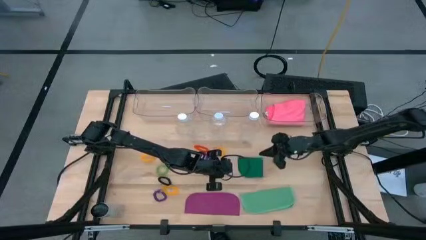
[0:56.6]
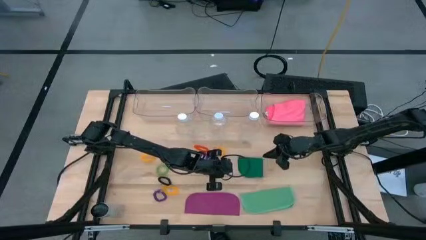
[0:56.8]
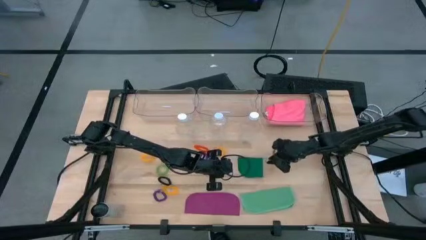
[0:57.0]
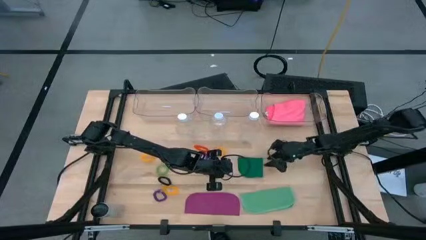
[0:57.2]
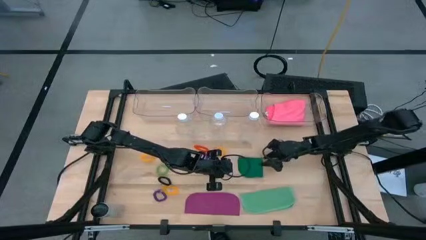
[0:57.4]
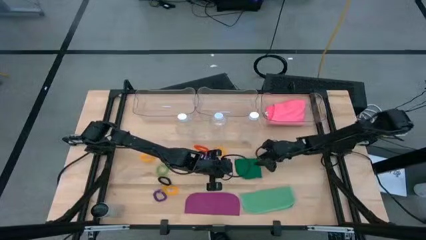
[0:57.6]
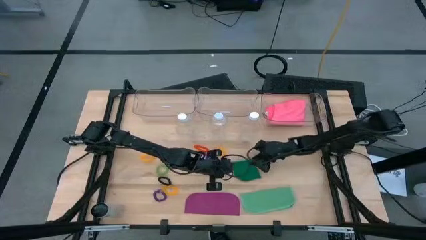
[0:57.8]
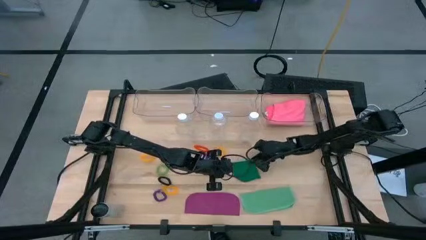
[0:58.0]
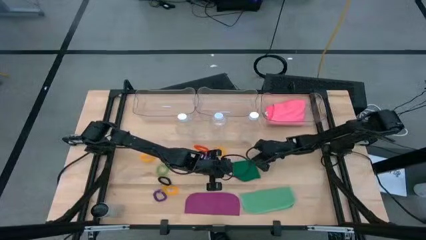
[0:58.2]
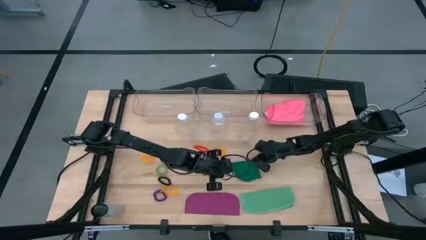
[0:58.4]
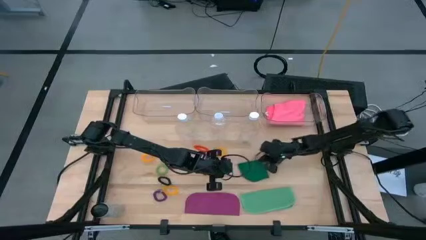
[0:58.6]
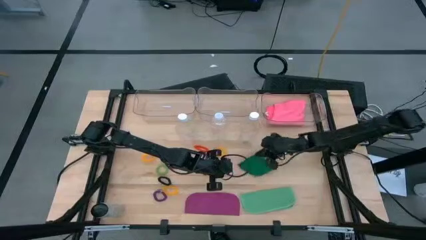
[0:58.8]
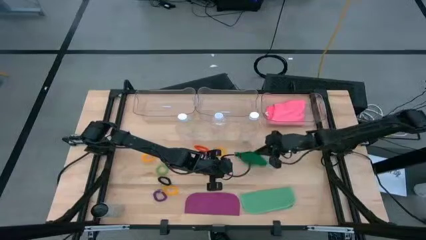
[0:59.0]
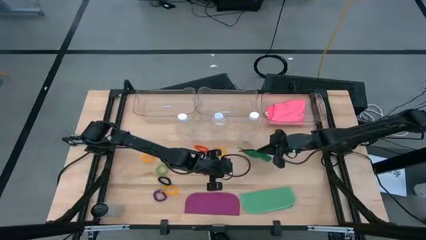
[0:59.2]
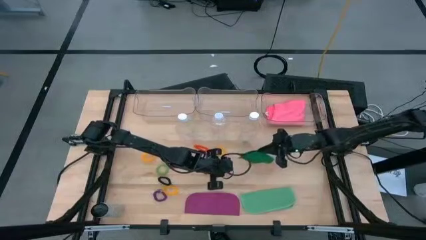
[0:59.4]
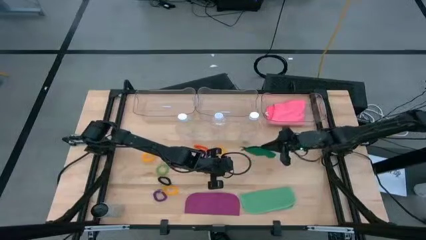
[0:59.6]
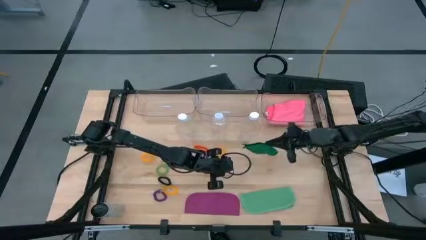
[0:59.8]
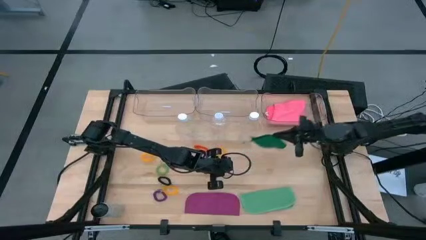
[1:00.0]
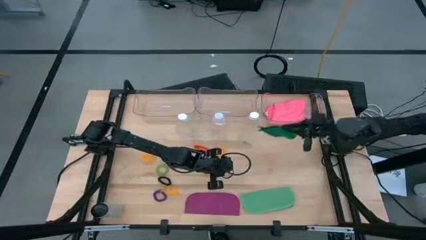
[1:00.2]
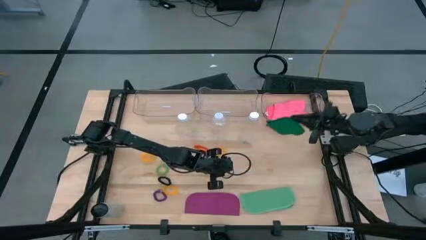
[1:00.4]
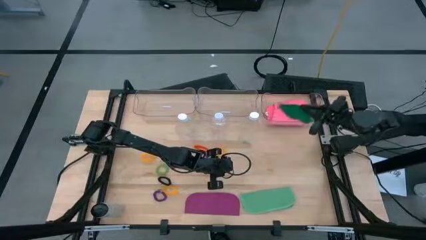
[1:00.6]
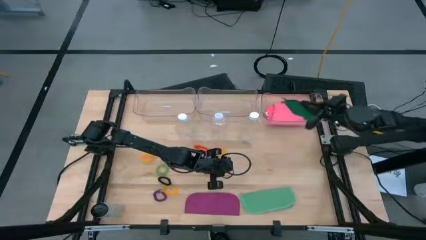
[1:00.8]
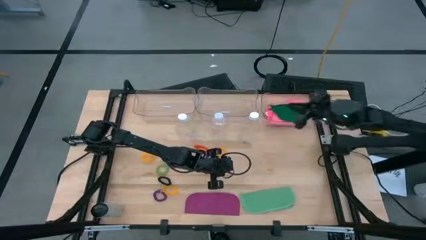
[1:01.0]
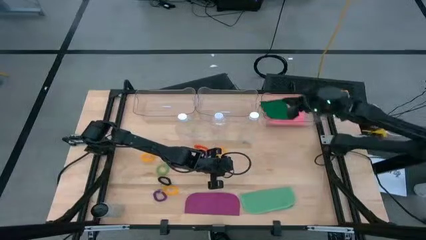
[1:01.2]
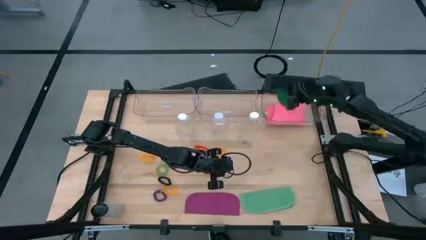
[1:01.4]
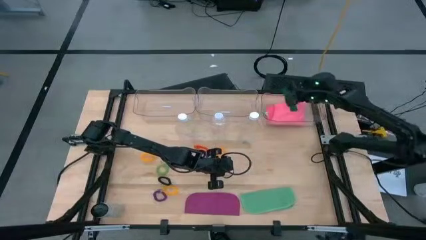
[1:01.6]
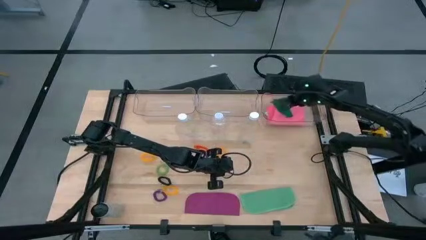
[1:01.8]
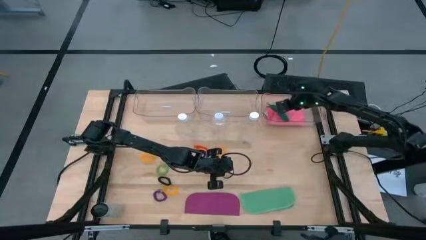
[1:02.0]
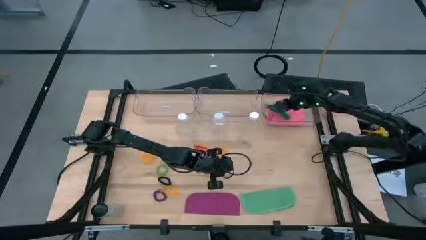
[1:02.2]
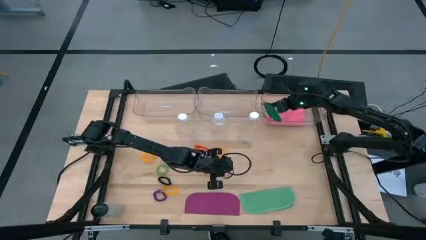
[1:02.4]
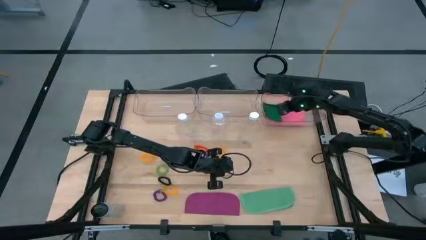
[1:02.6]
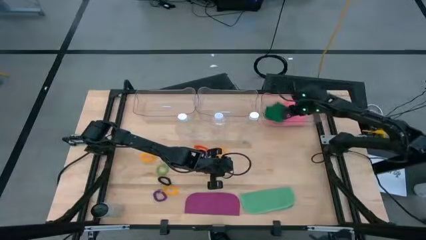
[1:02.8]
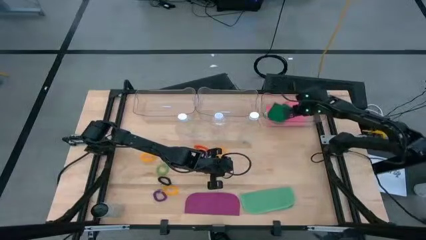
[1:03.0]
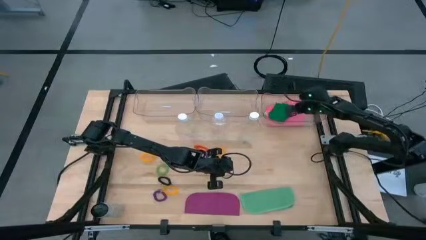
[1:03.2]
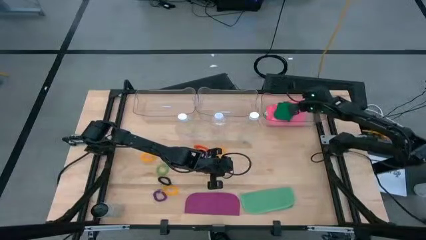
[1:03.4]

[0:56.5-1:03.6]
Task: Pick & Place Sports Items
Put the green microfiber towel into the right transparent bin

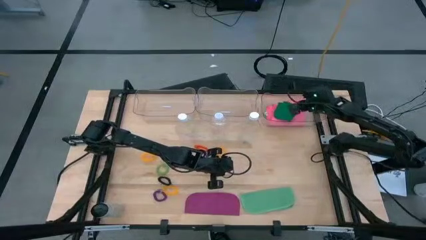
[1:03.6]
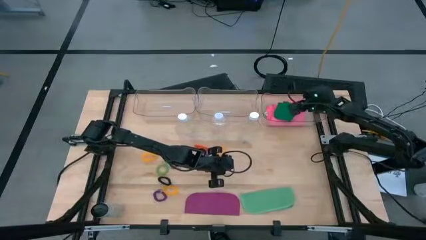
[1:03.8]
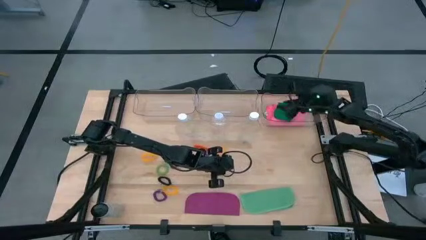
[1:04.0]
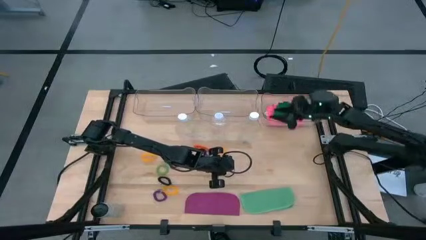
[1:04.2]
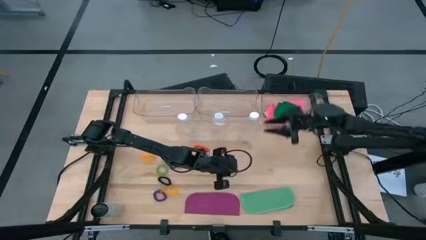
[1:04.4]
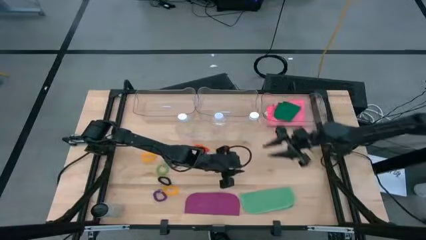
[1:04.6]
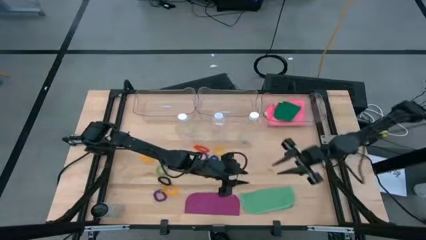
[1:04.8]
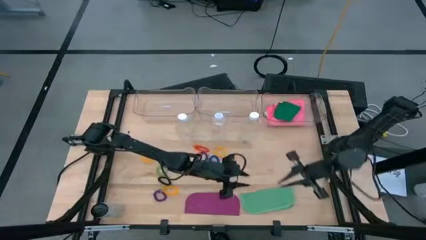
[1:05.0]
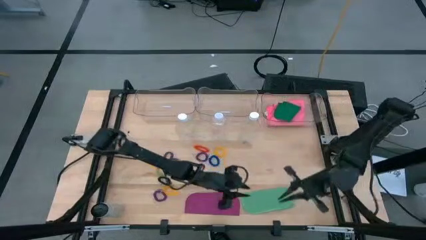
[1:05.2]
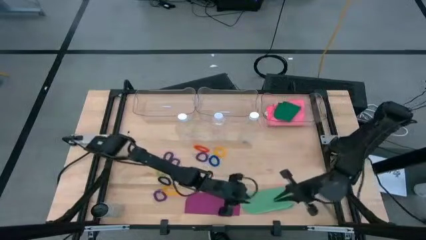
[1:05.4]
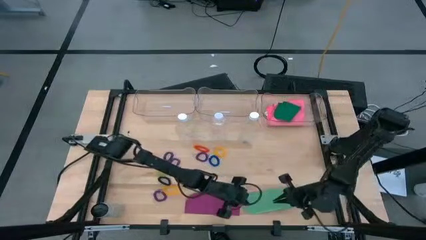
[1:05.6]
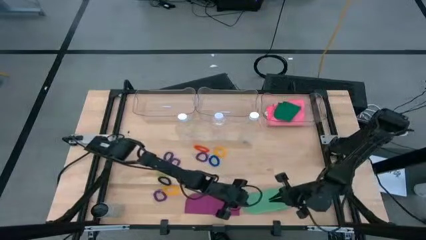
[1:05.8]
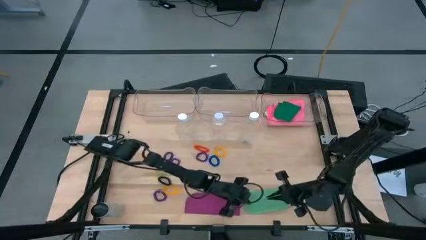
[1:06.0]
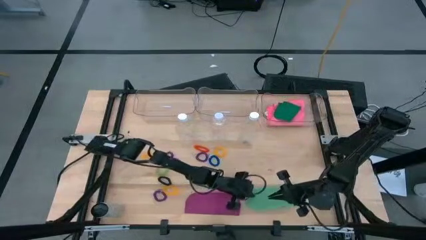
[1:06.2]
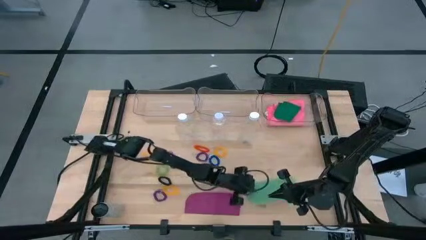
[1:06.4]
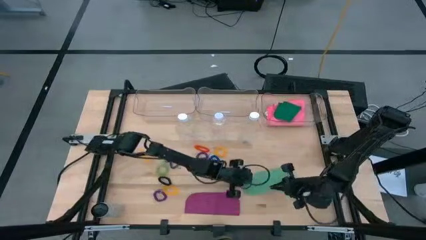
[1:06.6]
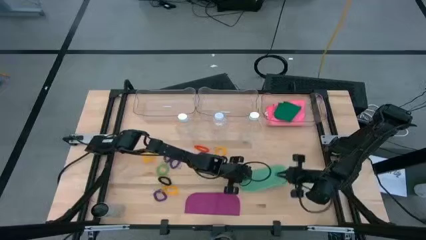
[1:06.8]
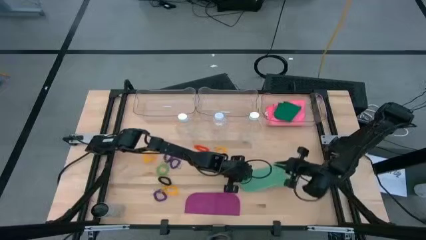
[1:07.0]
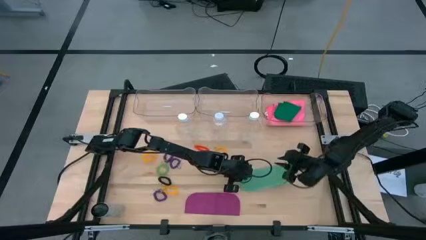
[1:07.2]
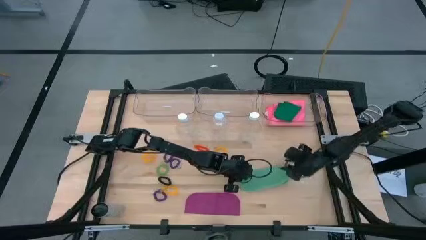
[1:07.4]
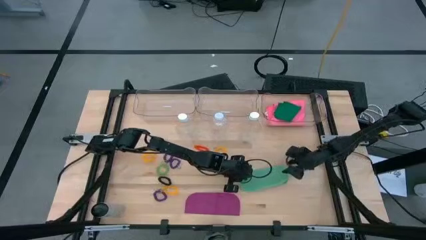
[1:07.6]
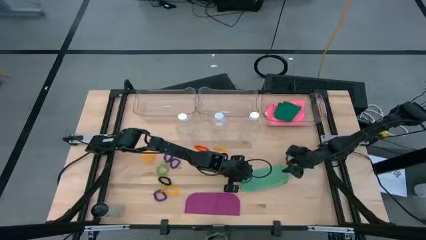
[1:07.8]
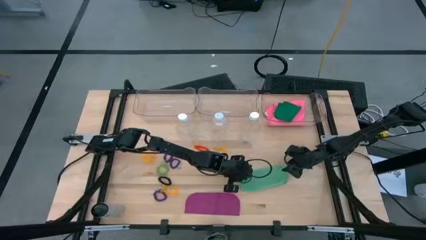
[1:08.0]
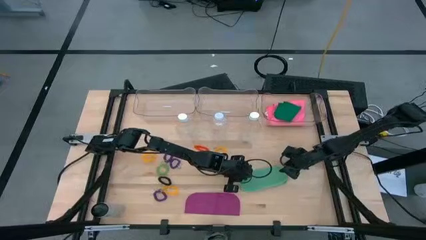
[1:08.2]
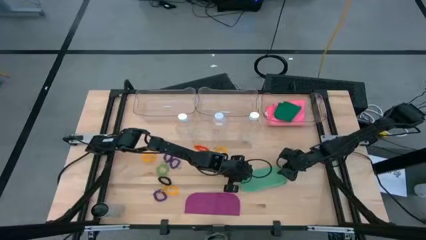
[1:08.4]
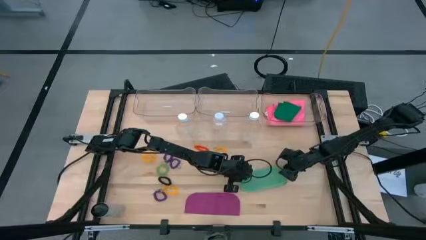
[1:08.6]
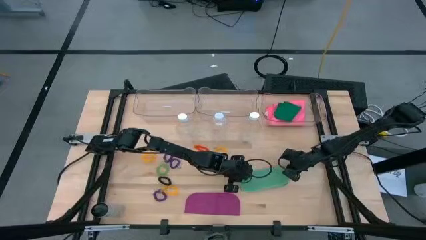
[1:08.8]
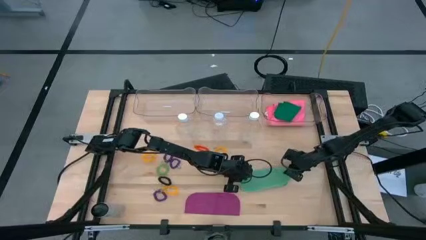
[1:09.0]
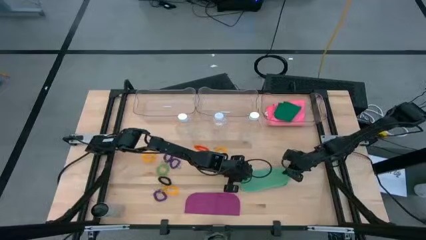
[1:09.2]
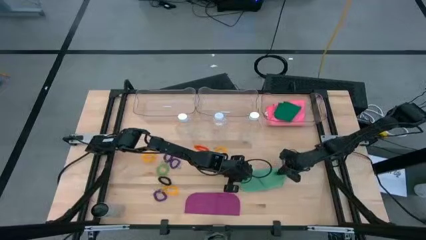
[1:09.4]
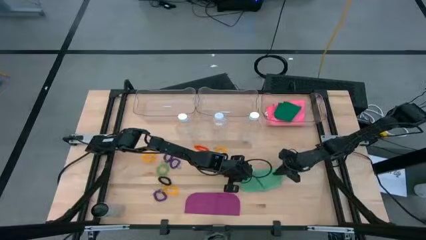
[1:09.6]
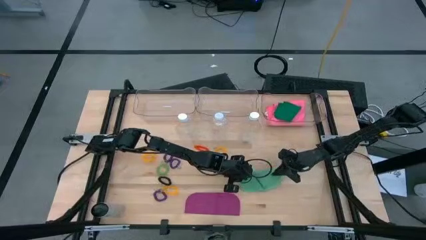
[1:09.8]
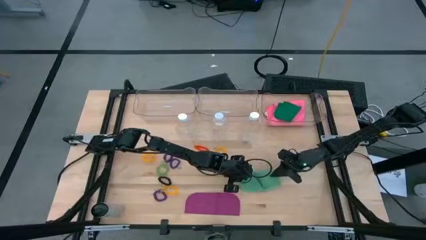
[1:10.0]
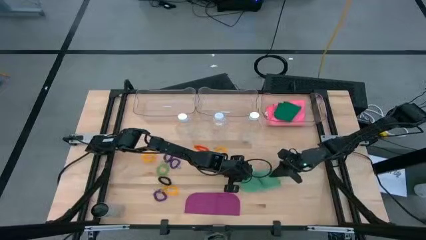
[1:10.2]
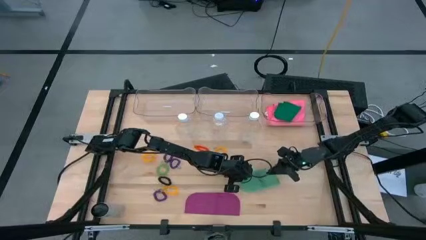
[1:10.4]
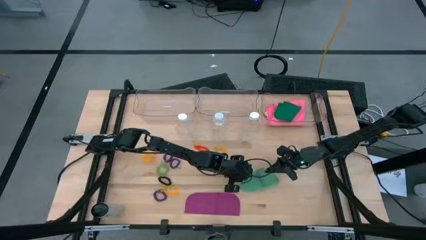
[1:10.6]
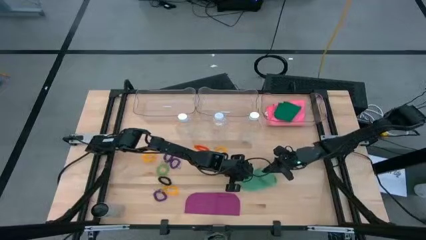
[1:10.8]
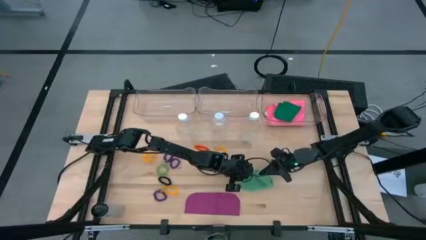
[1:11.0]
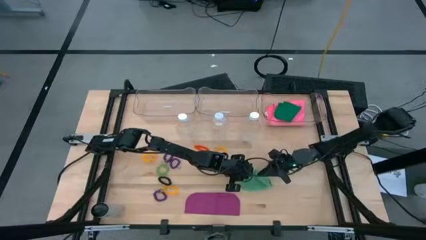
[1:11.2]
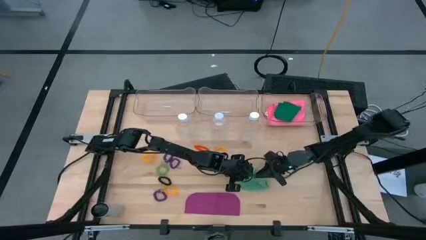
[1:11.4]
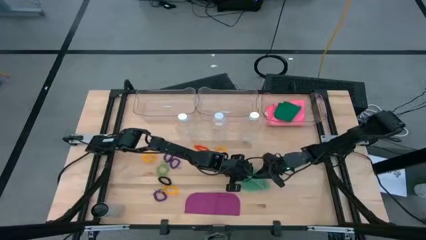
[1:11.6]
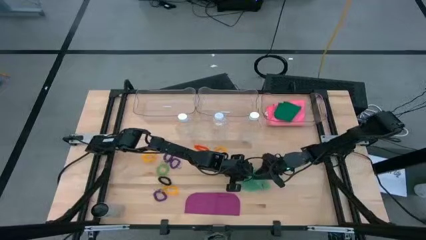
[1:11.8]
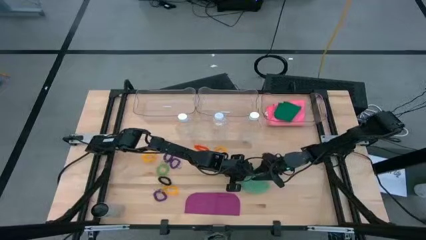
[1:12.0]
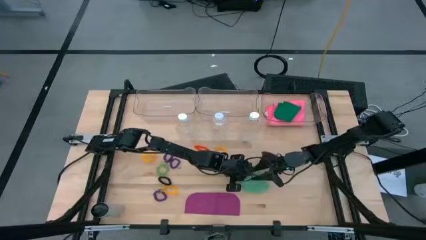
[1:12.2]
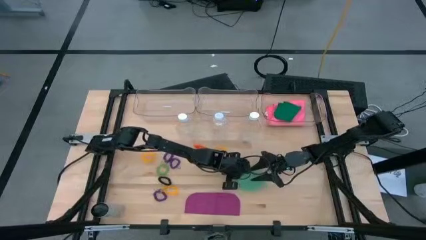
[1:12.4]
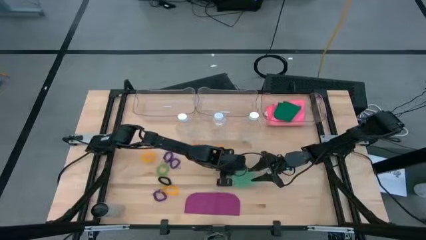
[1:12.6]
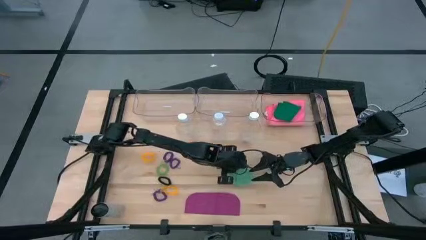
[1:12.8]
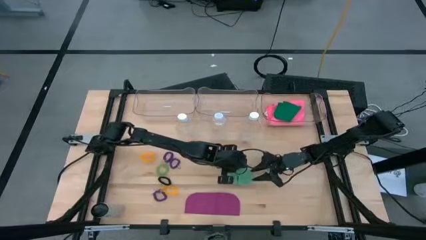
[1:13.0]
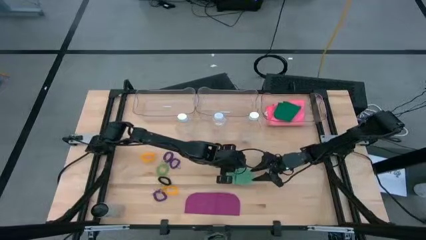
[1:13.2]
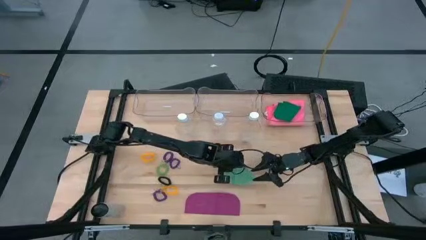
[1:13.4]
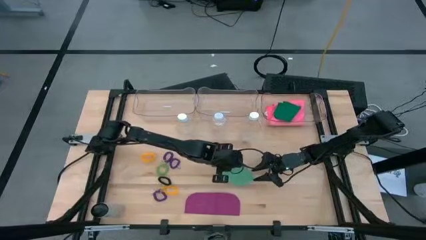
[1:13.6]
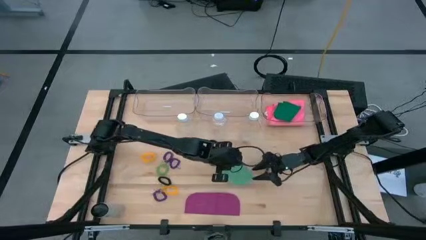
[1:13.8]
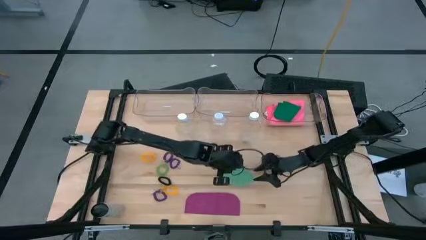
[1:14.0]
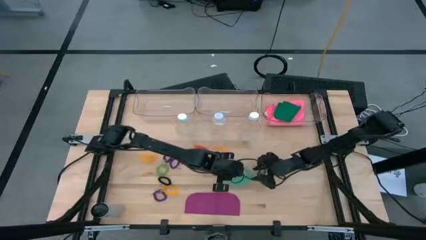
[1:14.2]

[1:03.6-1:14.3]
Fold the light green microfiber towel
